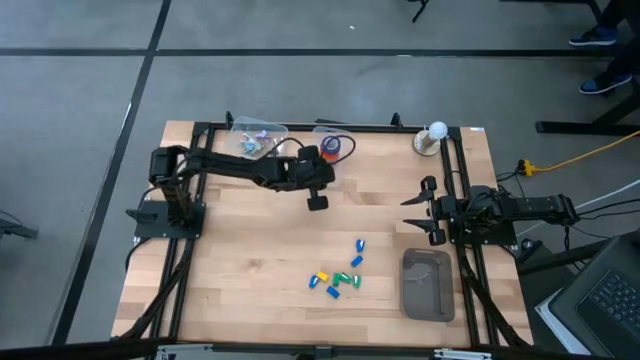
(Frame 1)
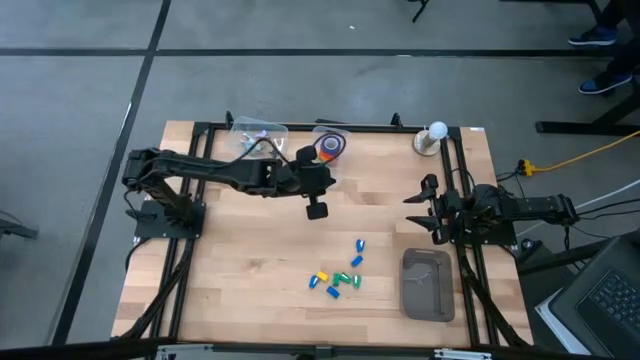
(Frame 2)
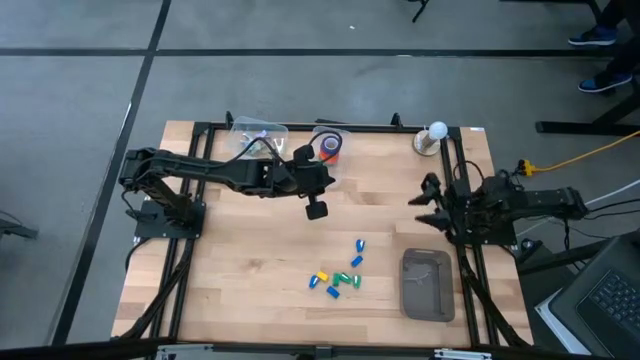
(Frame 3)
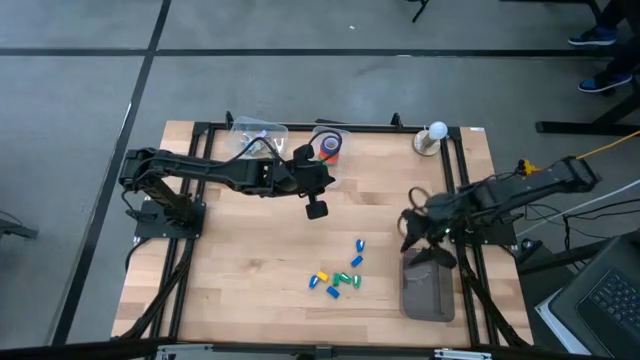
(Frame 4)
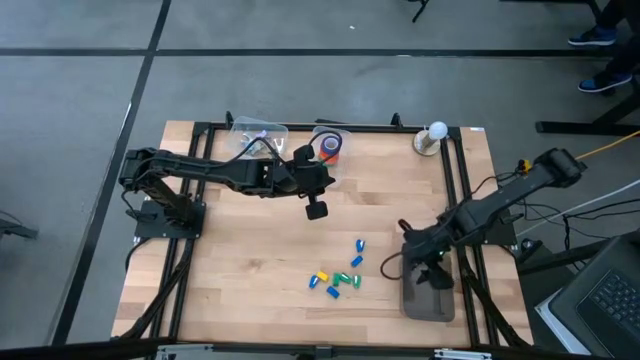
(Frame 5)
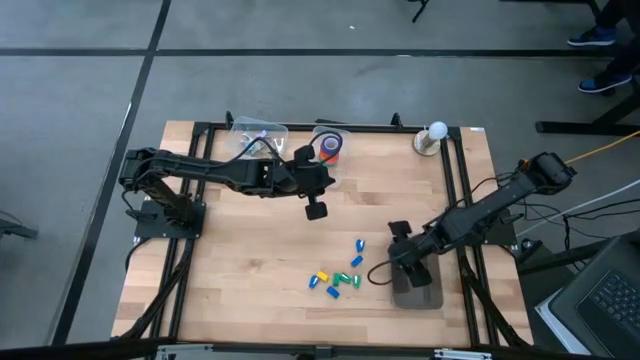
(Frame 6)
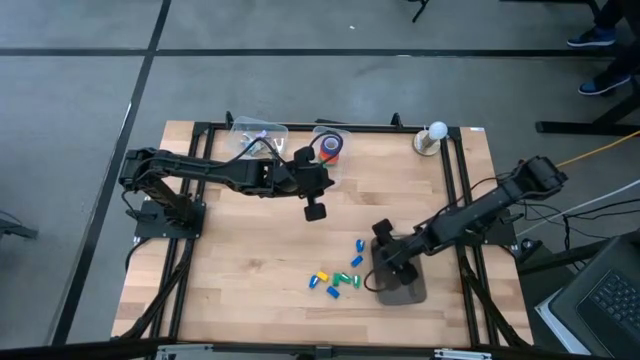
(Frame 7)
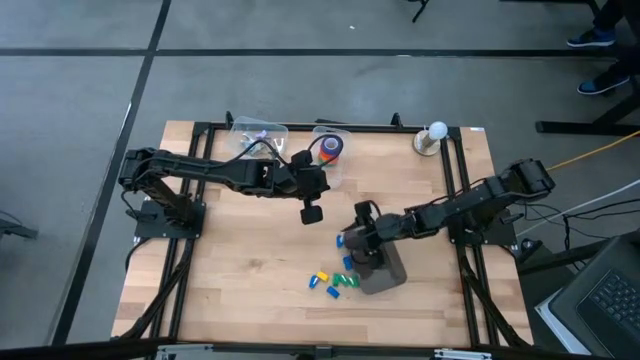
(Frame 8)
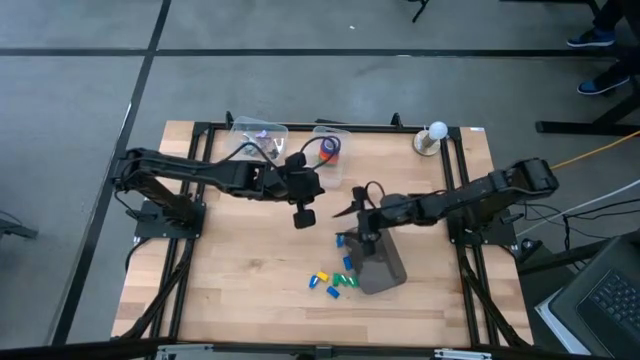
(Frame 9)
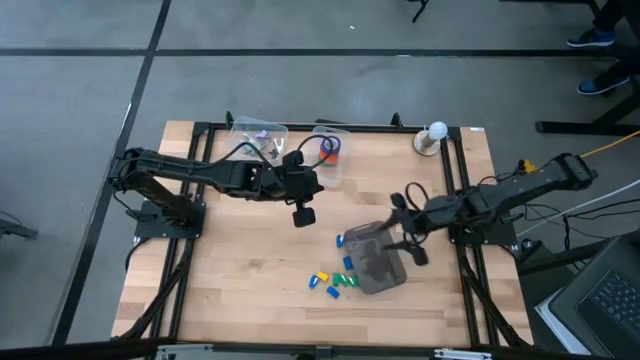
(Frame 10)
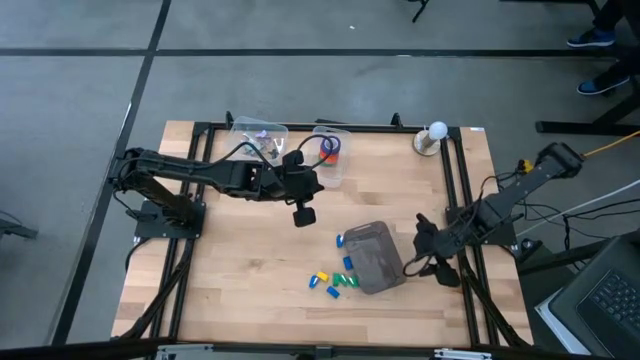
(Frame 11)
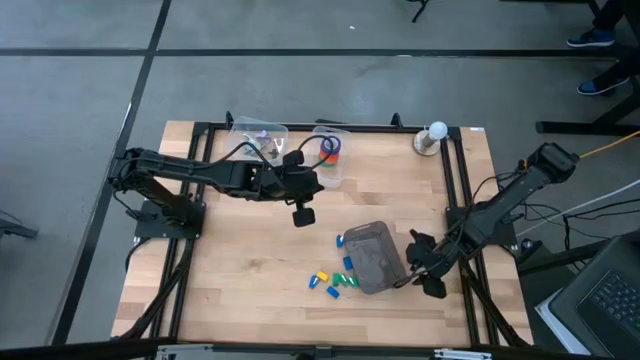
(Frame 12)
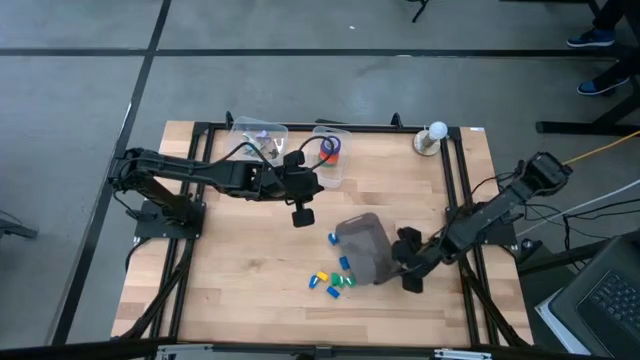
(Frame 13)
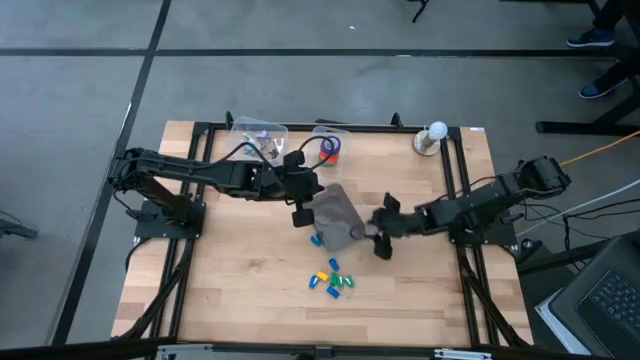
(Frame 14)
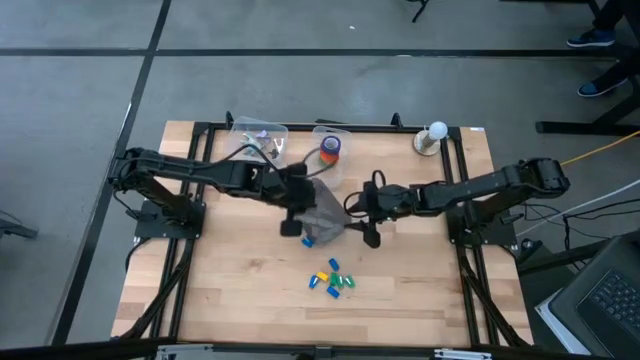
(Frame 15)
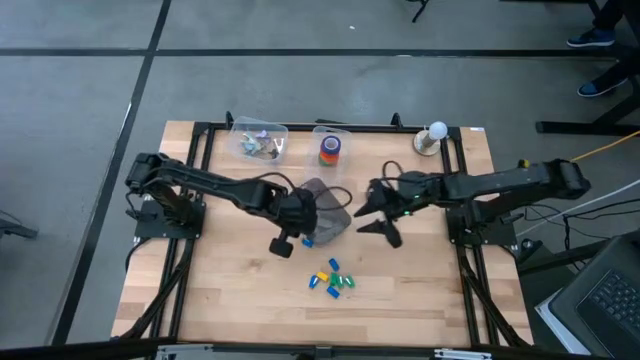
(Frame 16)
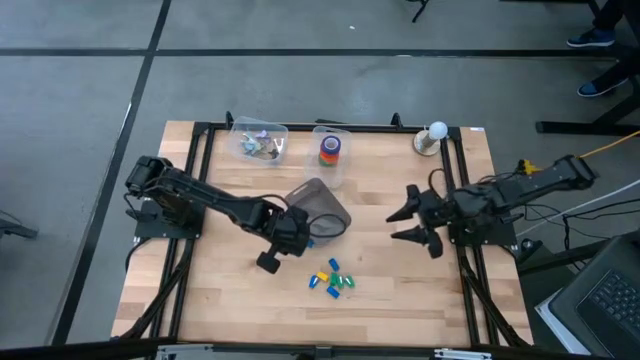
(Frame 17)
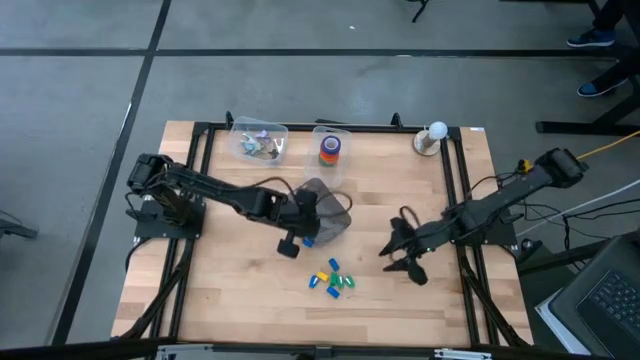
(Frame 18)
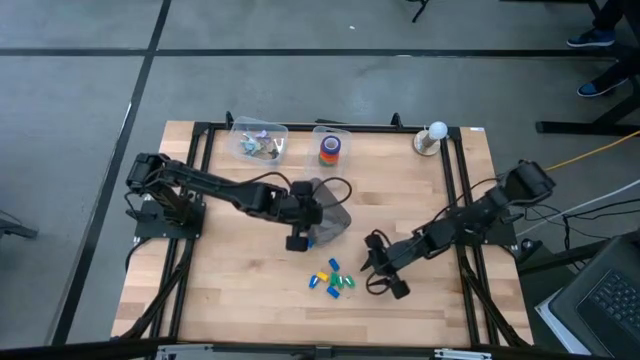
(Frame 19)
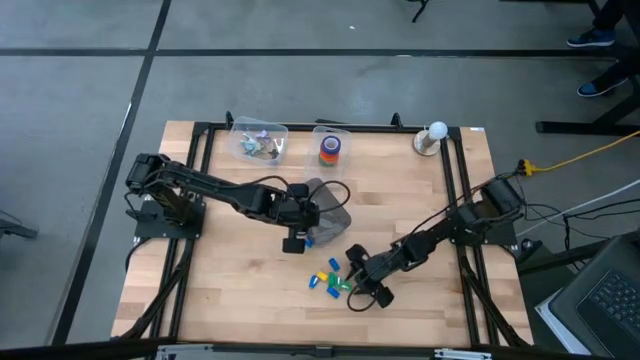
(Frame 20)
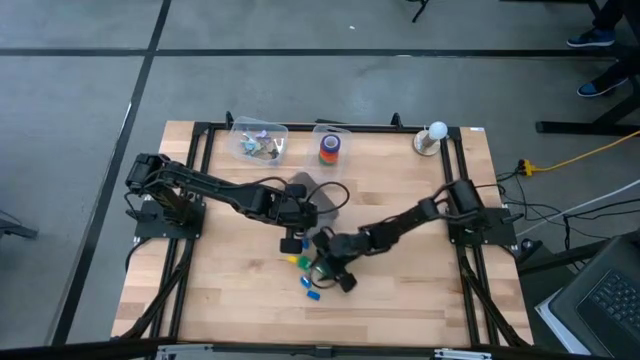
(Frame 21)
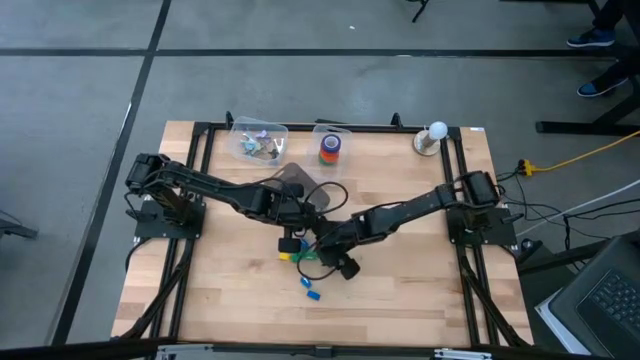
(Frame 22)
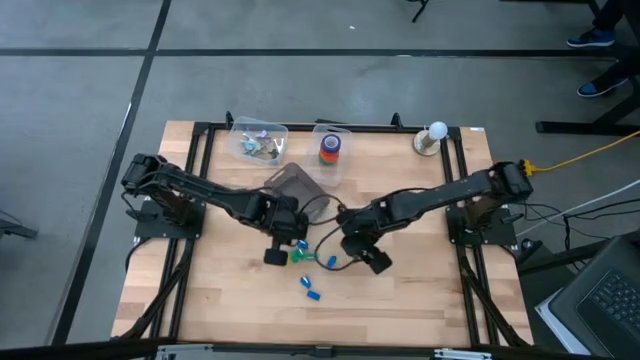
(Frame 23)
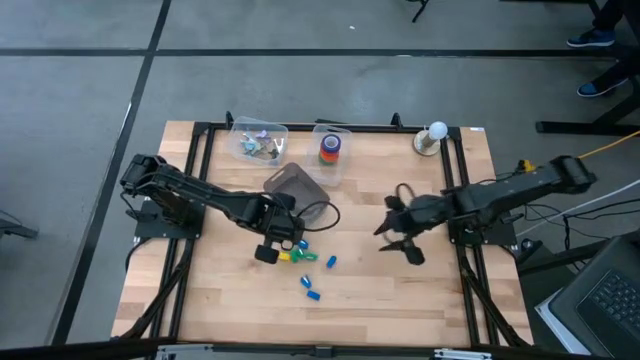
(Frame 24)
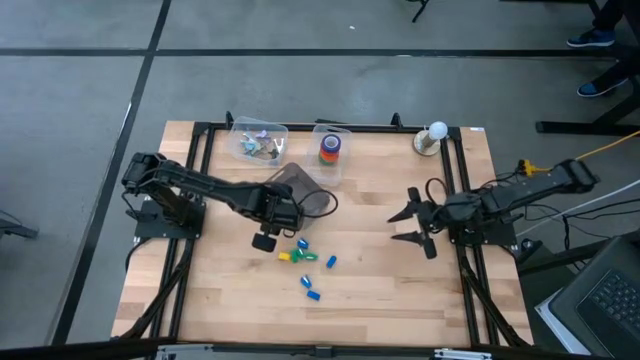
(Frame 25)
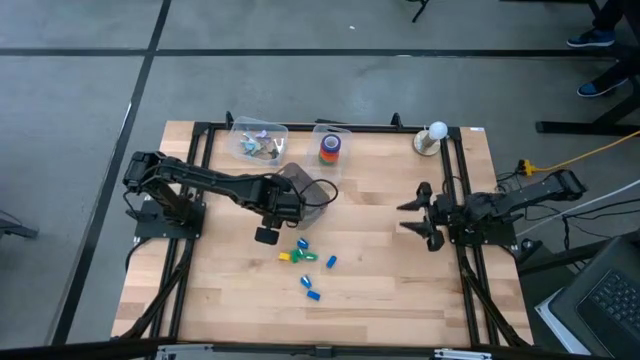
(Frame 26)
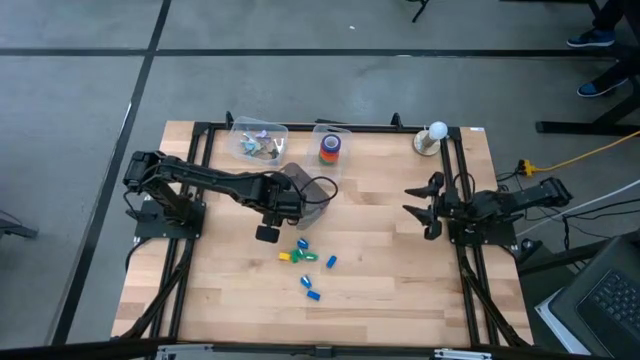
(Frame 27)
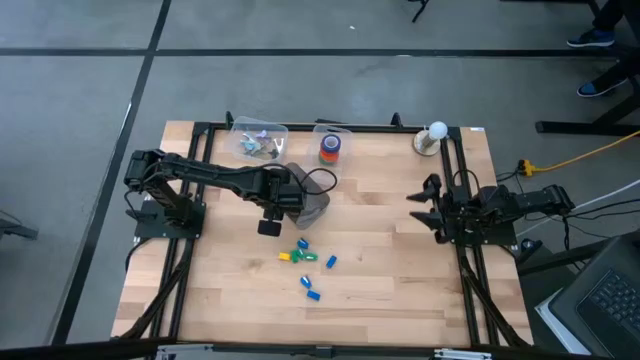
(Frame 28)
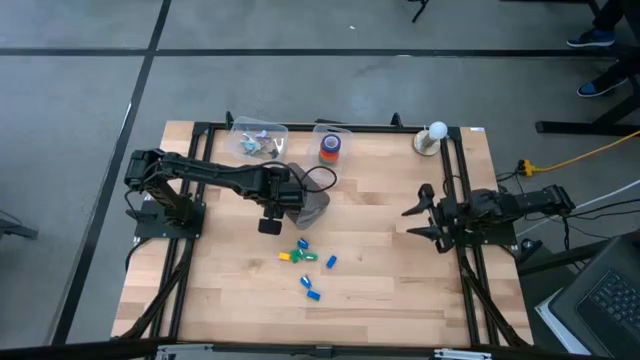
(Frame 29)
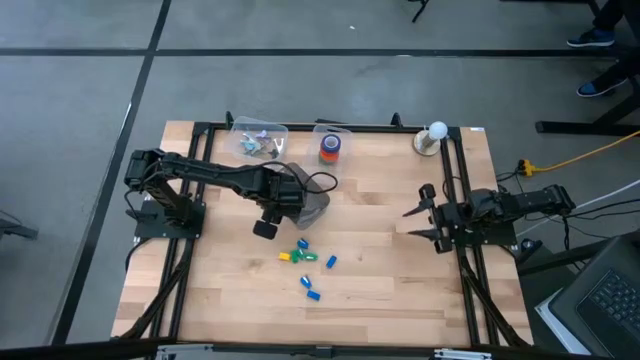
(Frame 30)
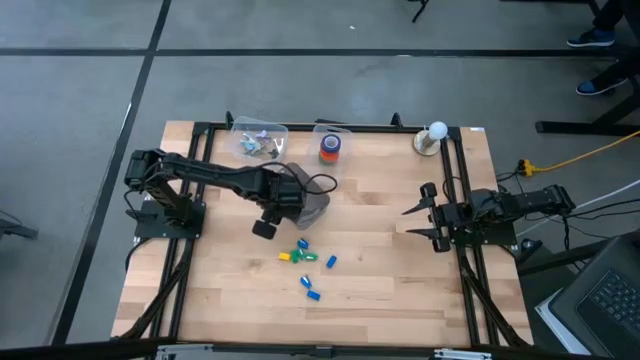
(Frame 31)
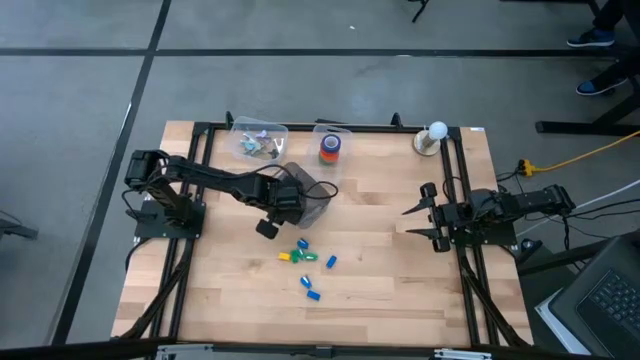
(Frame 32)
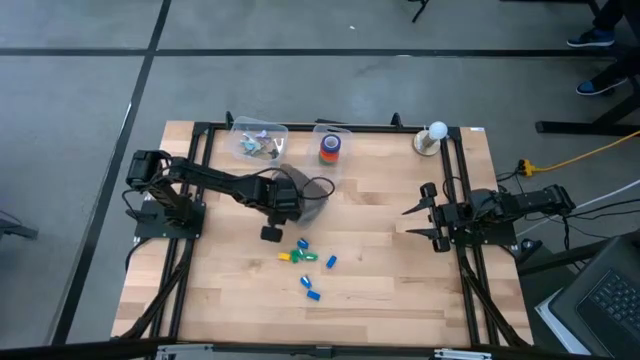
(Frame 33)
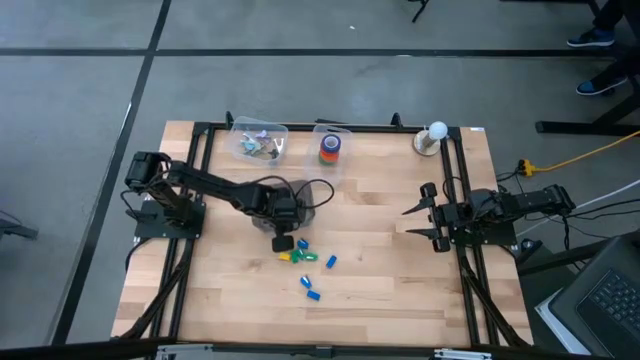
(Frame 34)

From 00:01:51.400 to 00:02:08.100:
Task: Pick and place Stapler, Stapler remover, tape
Move the black bin to the center of the table

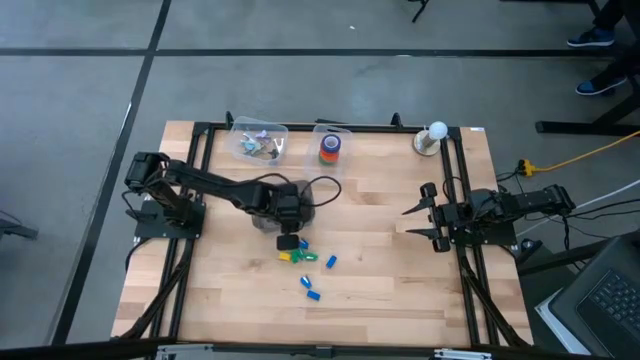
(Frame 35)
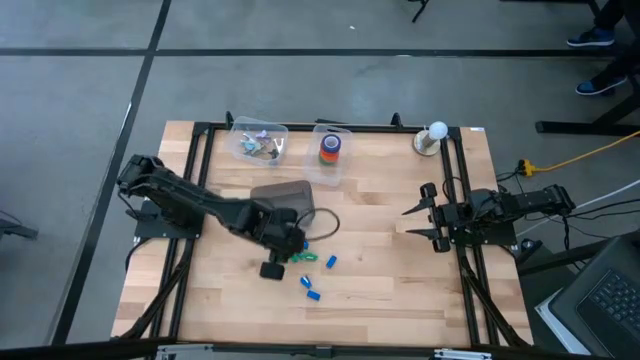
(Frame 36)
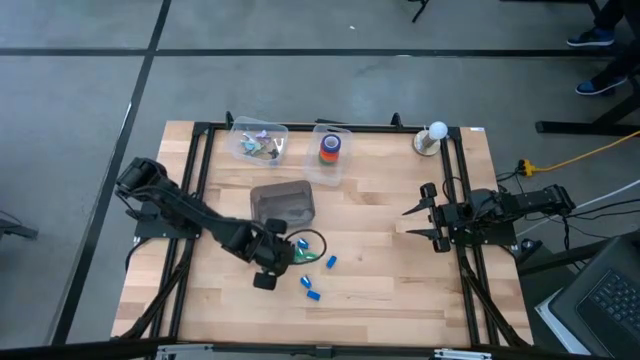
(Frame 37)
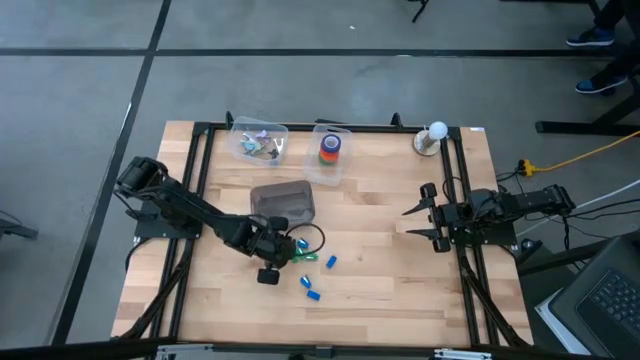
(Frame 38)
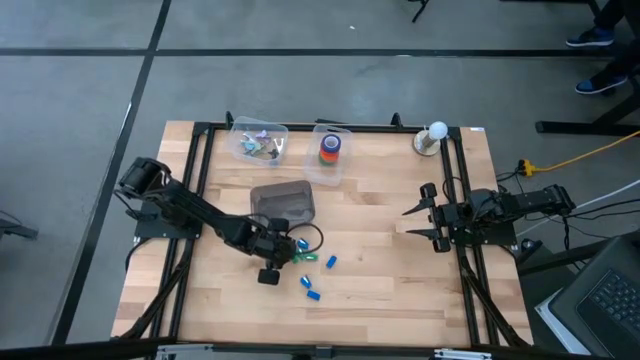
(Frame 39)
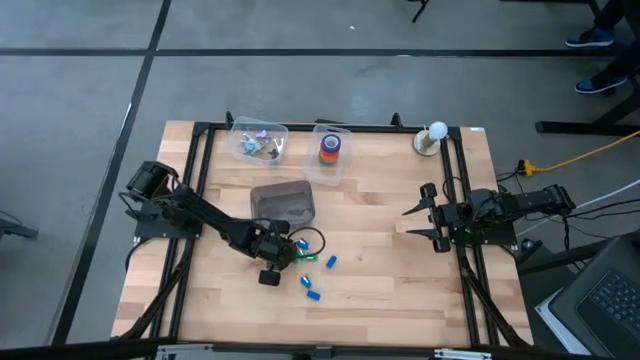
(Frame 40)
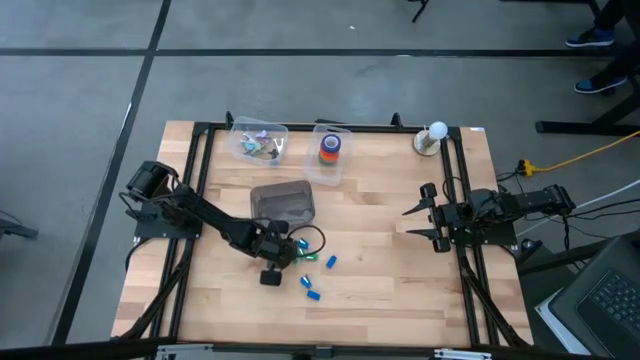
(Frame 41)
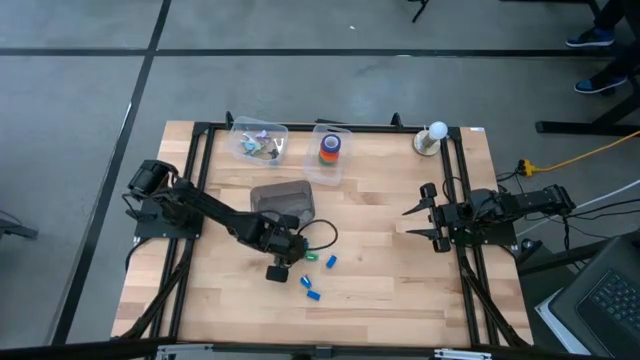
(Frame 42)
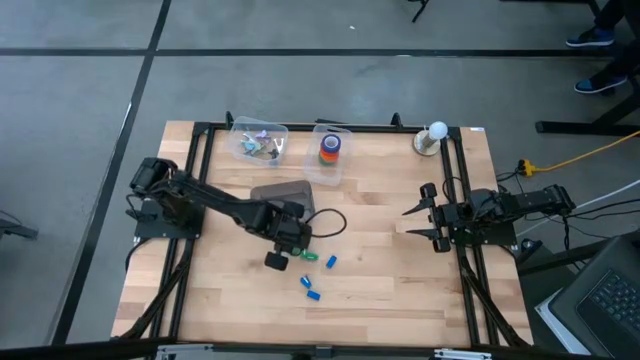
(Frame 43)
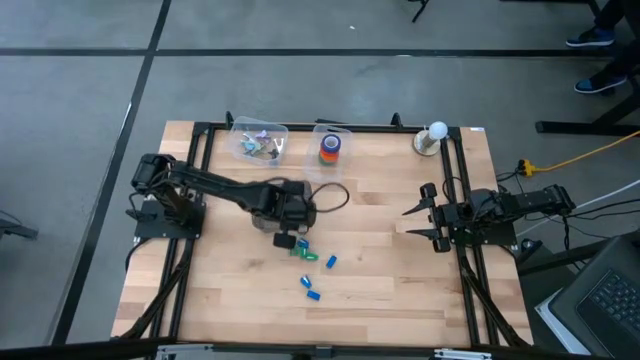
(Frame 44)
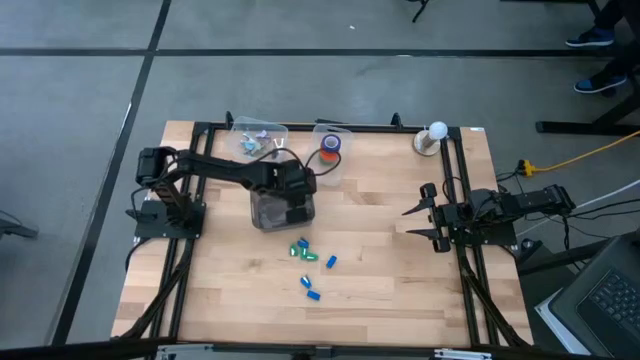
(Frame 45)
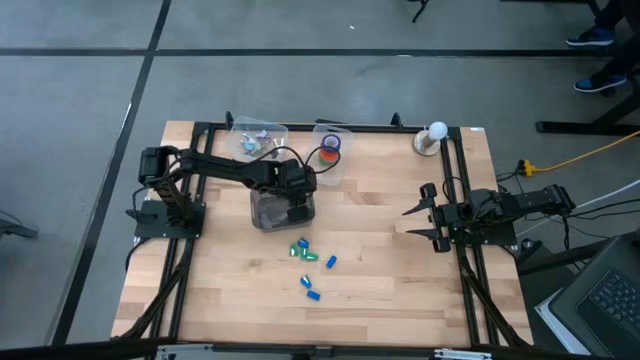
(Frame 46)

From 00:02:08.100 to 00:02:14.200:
Put the yellow stapler into the black bin
